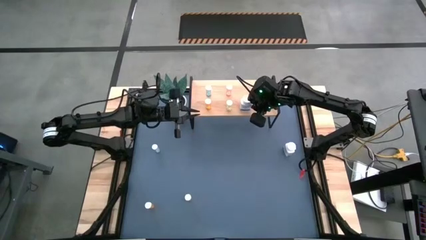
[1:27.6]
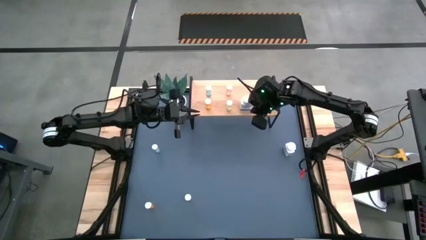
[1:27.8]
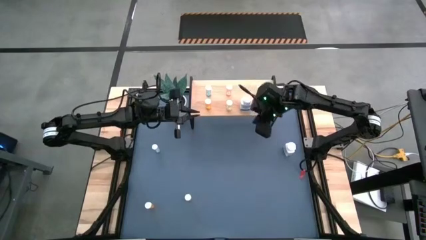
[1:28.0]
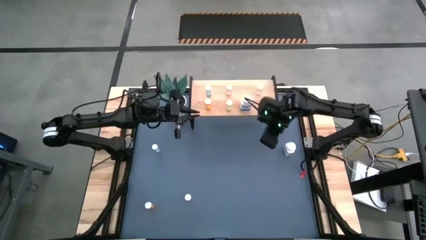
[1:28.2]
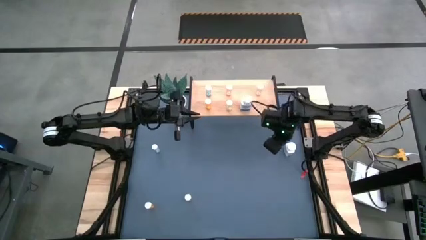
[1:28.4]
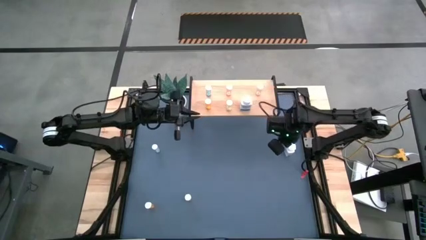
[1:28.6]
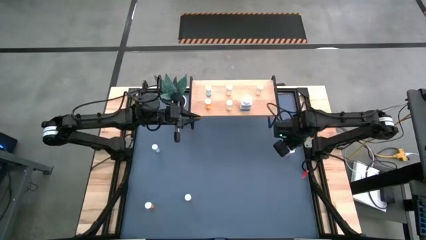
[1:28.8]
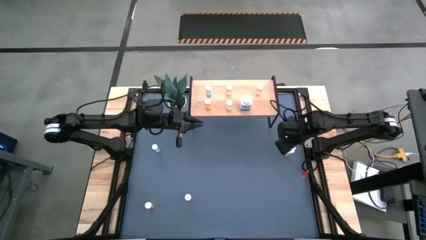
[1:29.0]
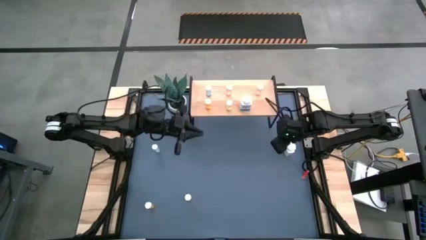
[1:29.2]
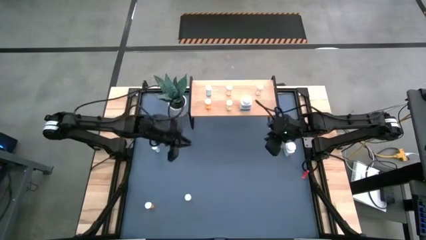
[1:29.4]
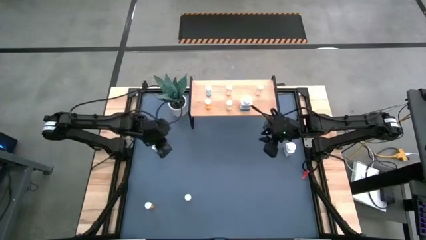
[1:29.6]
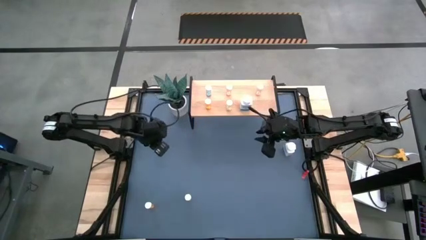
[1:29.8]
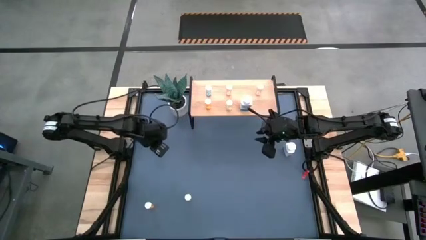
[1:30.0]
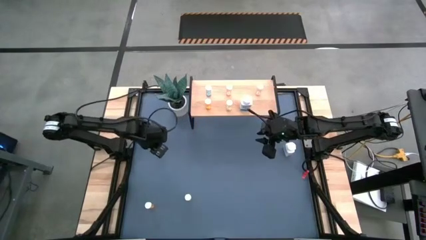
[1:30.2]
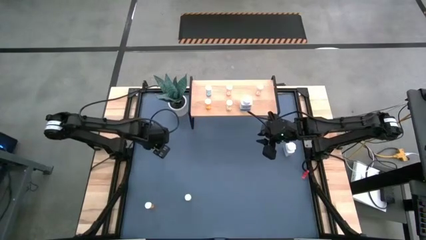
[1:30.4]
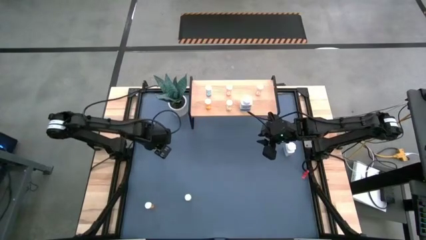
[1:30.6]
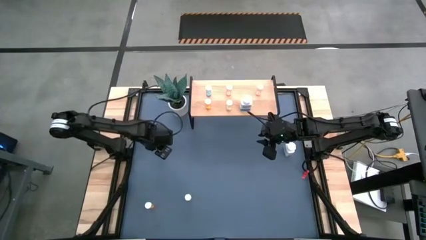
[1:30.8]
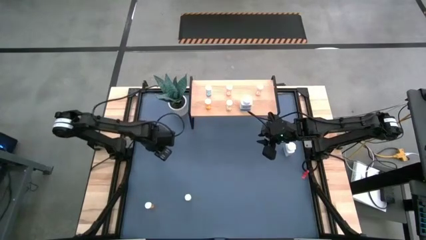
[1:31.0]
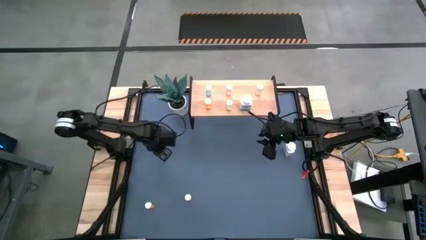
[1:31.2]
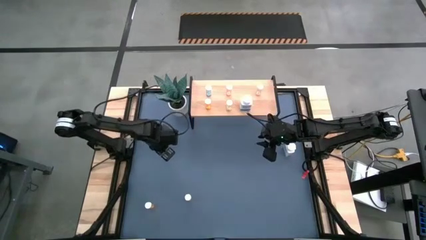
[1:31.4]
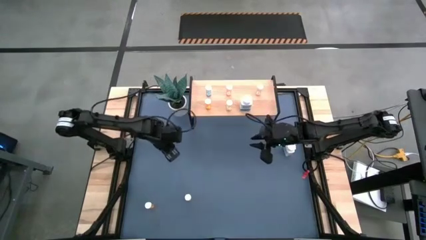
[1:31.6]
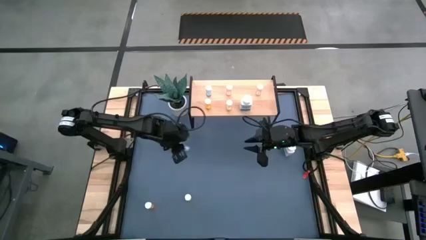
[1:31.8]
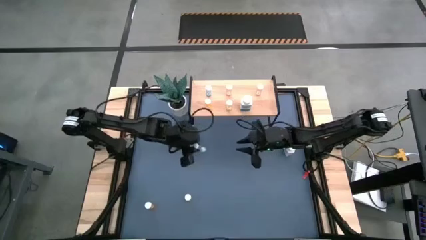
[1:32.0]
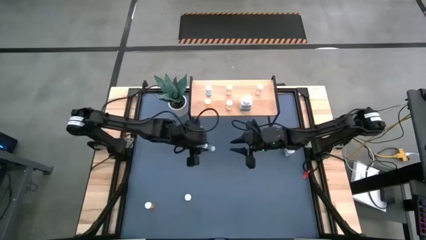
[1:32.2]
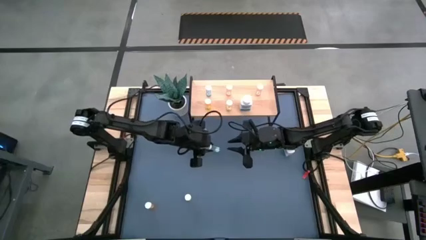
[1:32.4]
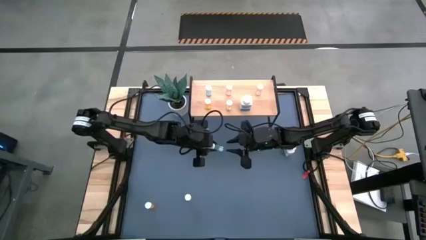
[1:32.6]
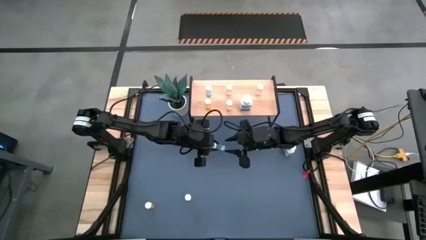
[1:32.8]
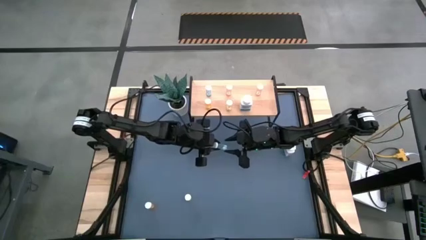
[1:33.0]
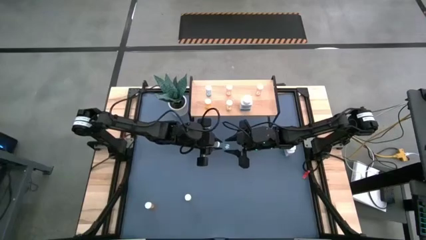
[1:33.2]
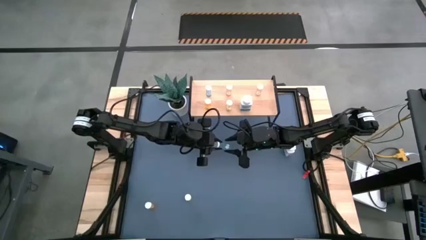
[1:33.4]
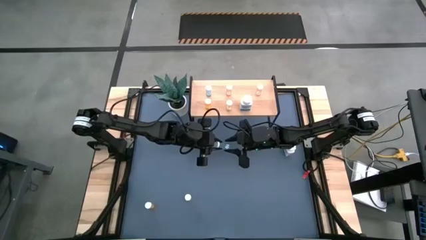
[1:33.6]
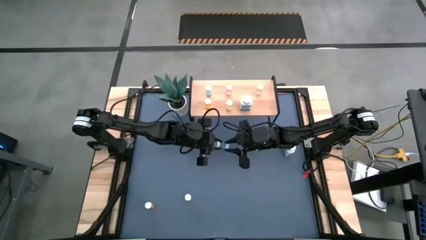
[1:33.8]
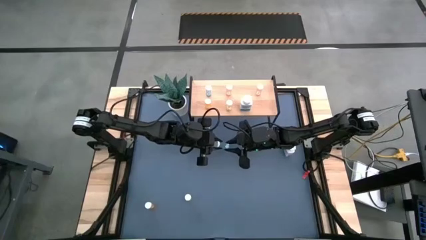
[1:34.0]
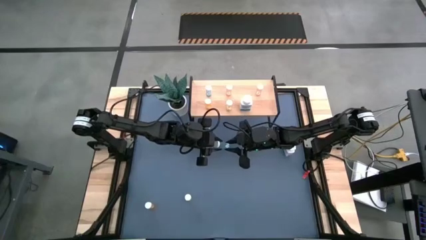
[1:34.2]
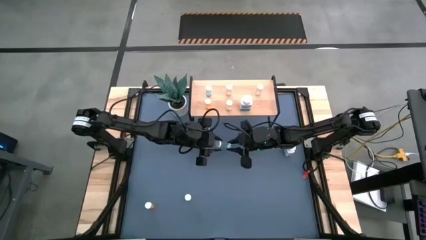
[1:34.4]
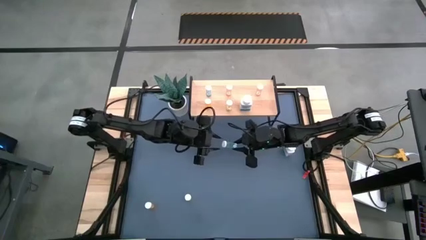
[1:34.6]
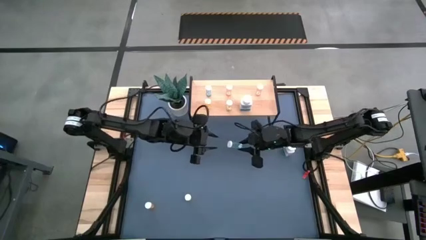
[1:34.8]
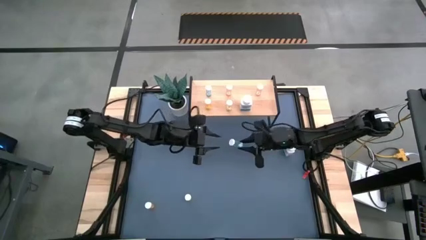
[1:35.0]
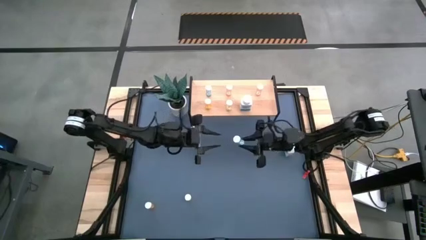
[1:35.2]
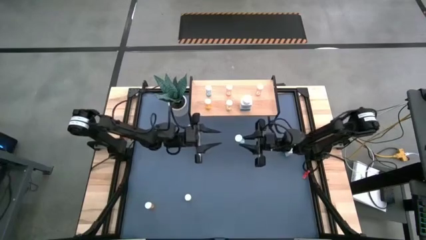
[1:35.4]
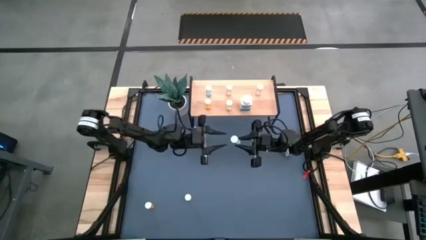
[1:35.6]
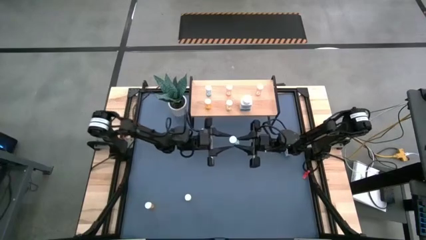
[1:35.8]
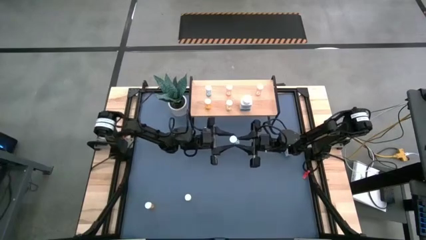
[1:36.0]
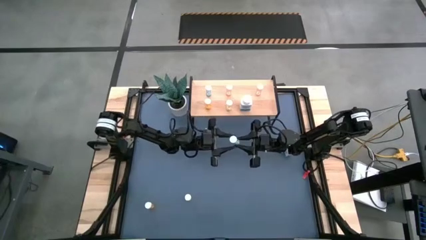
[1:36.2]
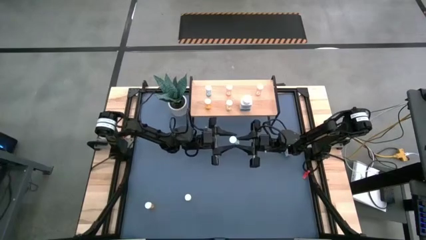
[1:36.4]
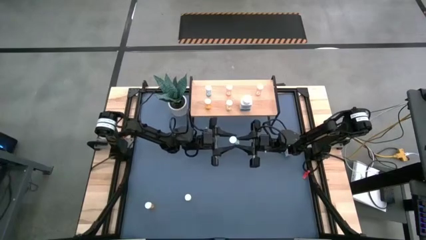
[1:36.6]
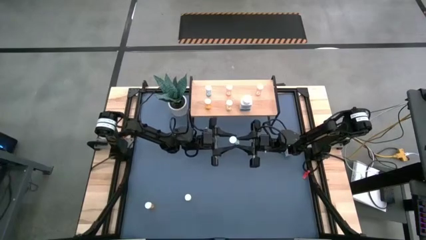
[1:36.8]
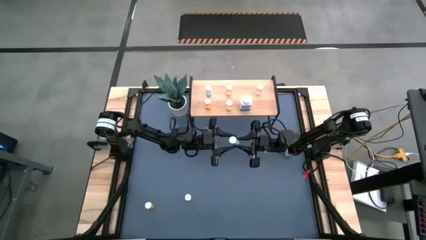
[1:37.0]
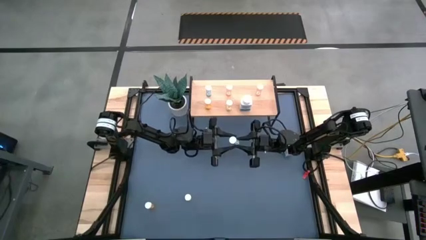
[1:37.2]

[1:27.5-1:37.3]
Task: Pick and place medicine bottles onto shelf by color
Put the blue medicine bottle on the shelf

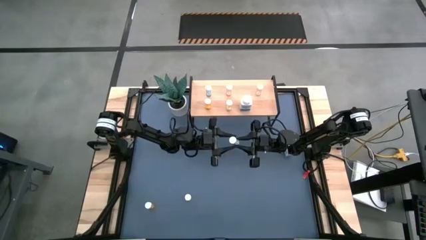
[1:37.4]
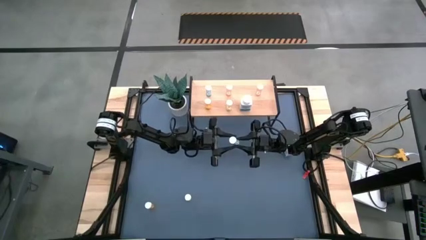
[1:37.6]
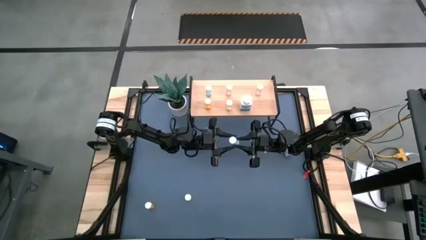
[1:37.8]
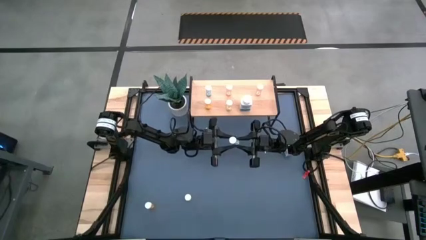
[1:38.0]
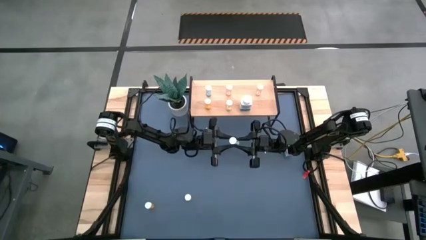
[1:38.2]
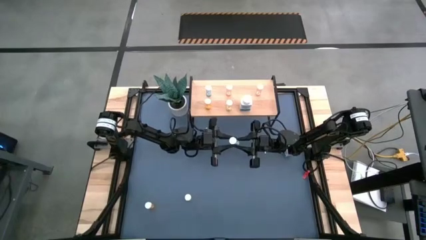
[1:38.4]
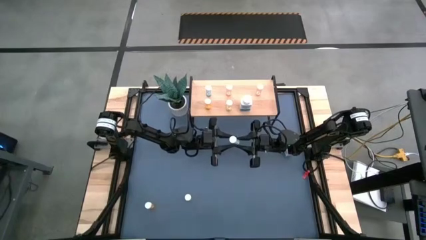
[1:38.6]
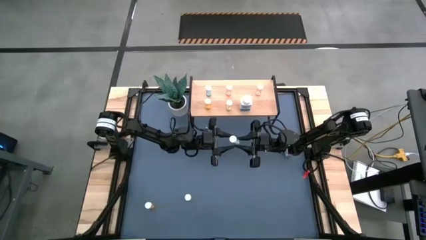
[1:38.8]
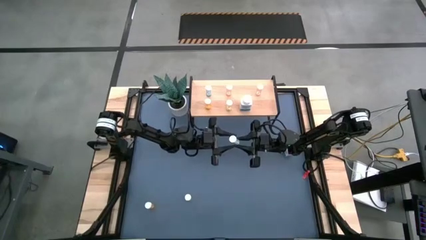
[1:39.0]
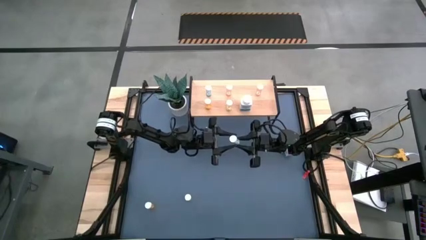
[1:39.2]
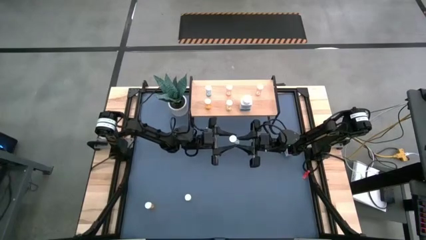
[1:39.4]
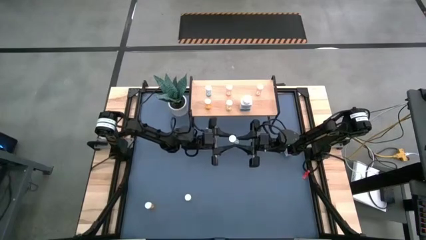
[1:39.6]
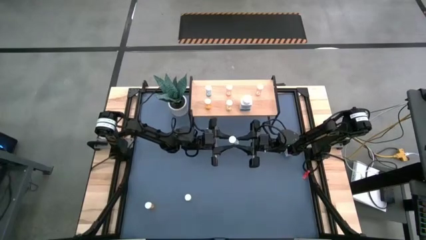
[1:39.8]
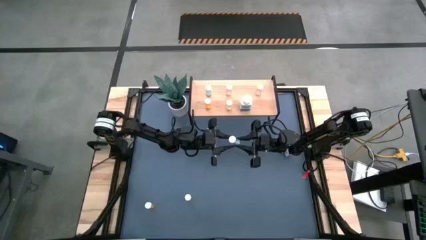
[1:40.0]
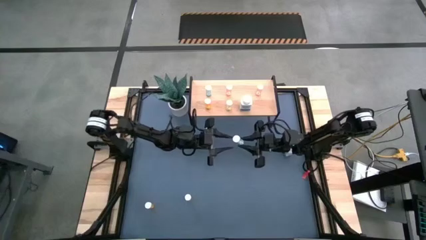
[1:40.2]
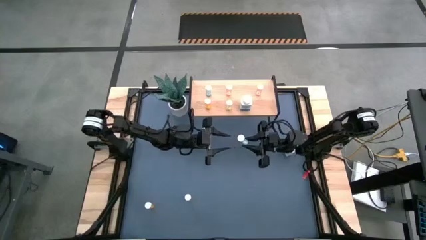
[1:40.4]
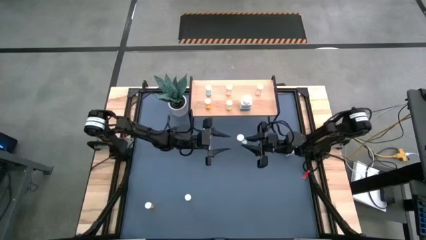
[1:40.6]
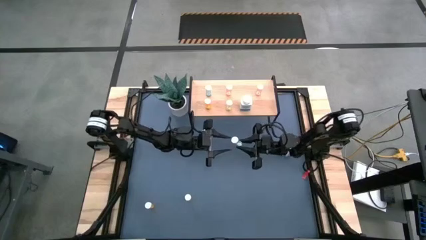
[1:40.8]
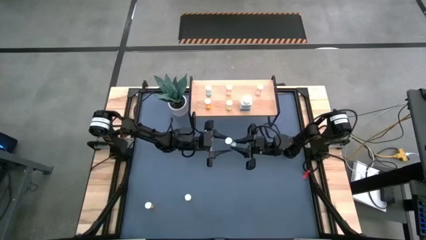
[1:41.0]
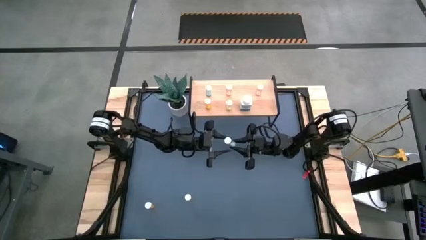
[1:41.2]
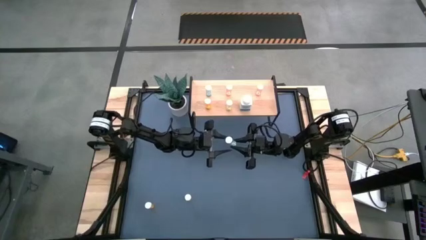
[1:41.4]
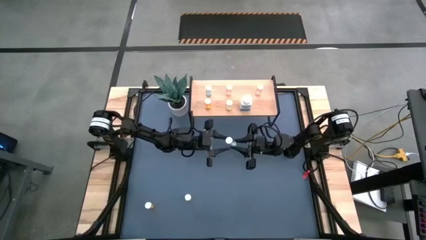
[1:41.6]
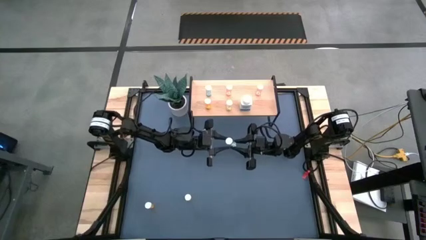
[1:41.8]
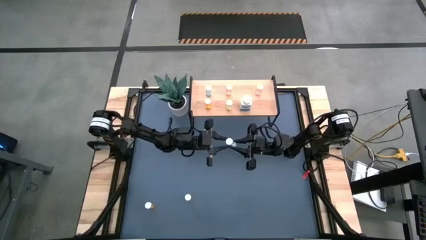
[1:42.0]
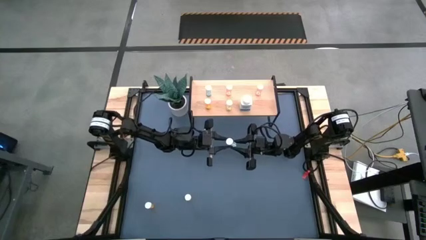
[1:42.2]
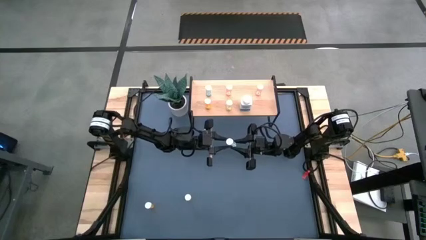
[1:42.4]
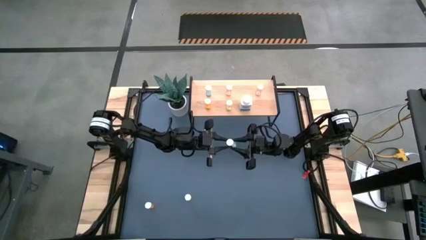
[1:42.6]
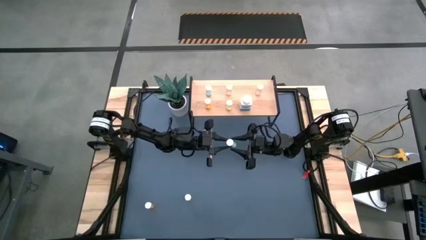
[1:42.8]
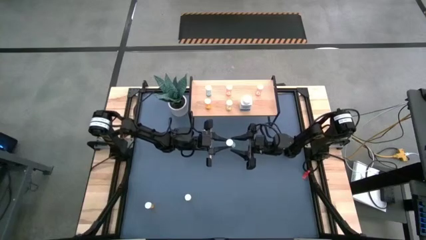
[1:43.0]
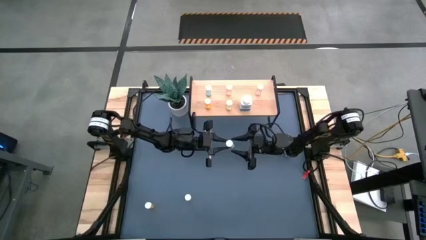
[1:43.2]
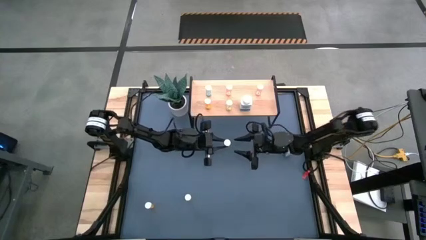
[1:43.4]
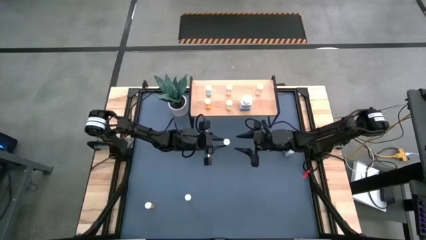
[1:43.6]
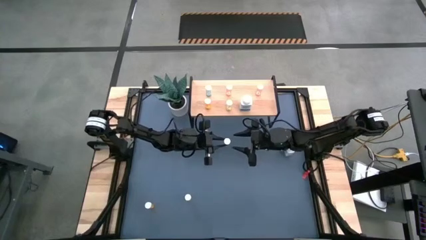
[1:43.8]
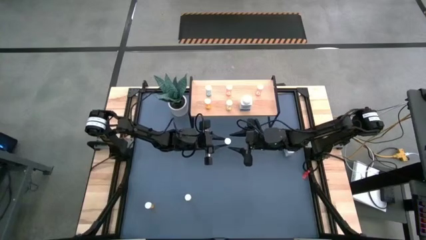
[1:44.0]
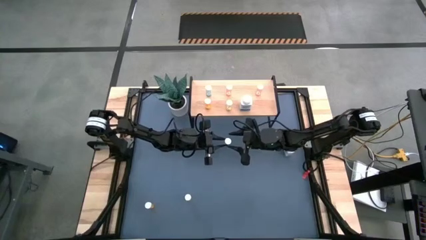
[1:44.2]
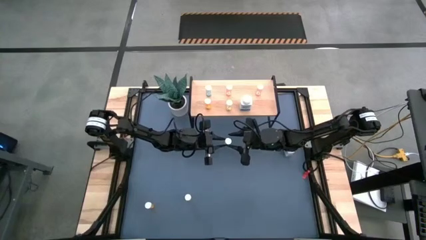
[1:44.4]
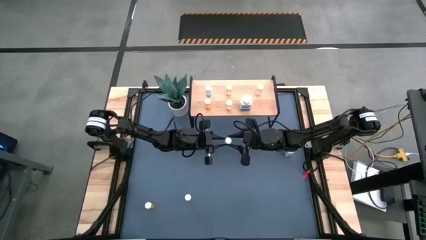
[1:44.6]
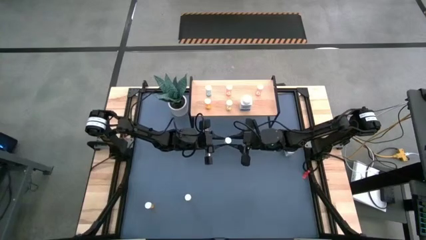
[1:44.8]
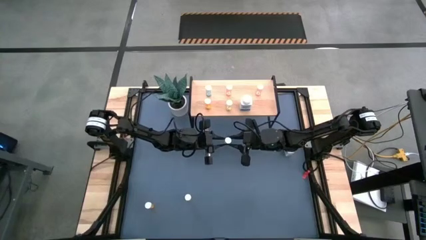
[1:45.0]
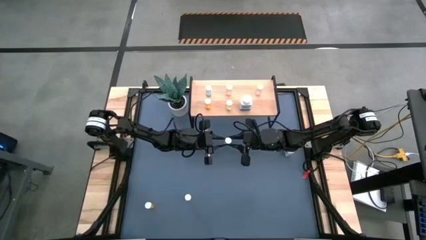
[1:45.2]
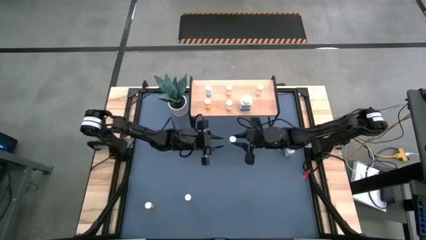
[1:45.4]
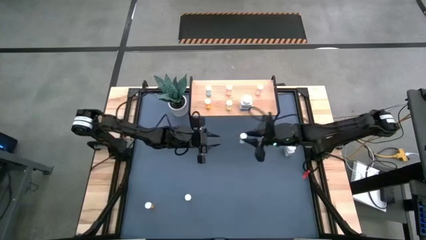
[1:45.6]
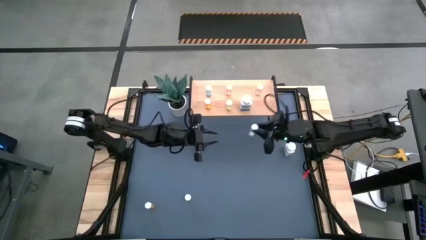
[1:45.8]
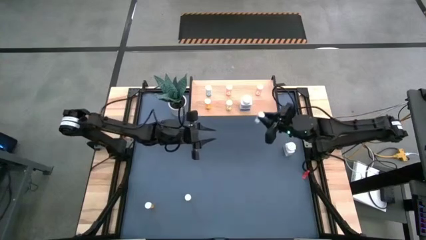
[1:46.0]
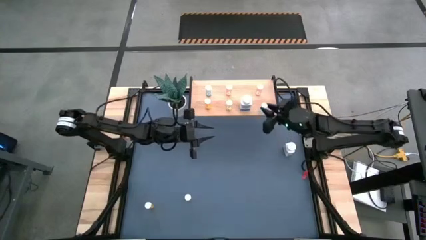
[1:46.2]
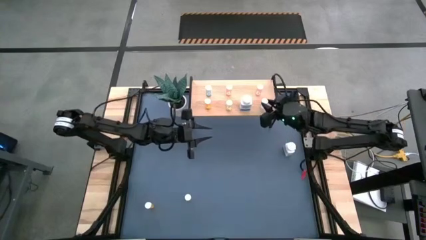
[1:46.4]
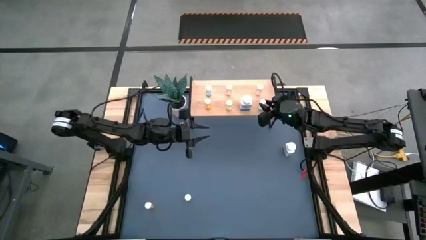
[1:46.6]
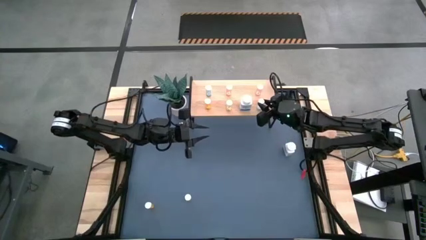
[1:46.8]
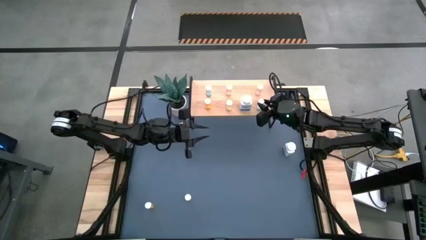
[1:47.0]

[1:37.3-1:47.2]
Put the blue medicine bottle on the shelf
